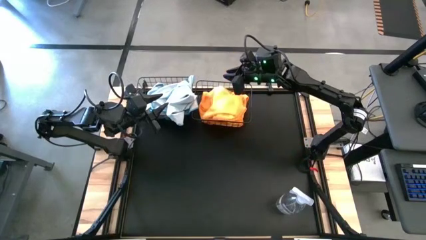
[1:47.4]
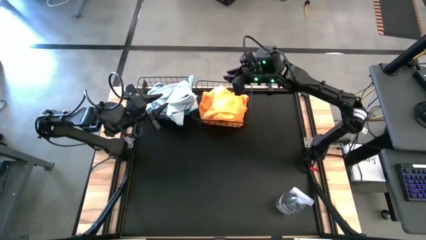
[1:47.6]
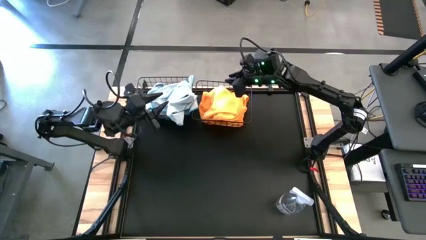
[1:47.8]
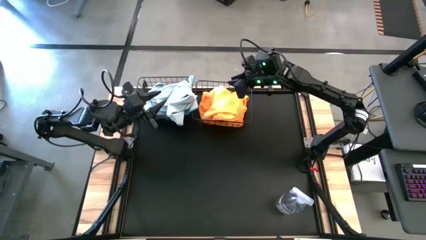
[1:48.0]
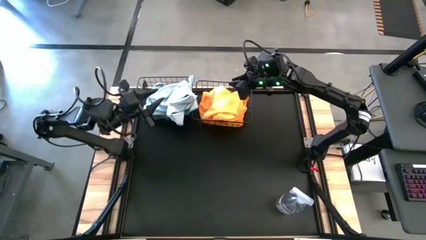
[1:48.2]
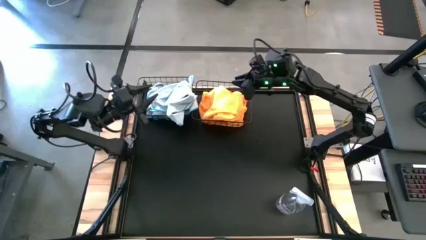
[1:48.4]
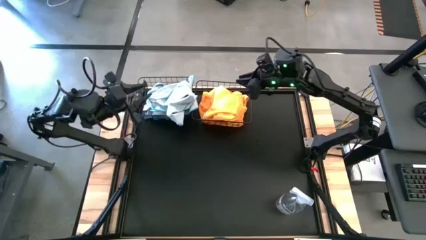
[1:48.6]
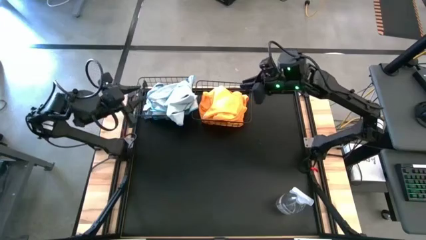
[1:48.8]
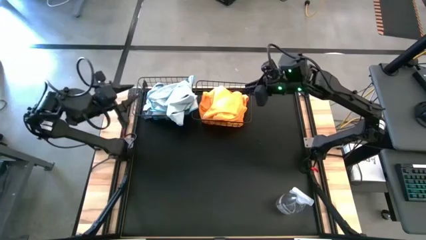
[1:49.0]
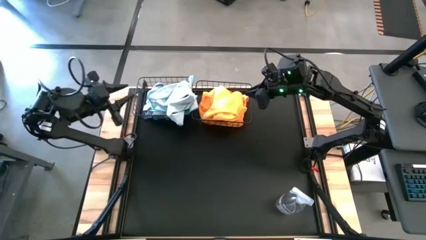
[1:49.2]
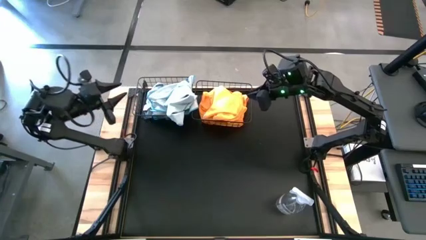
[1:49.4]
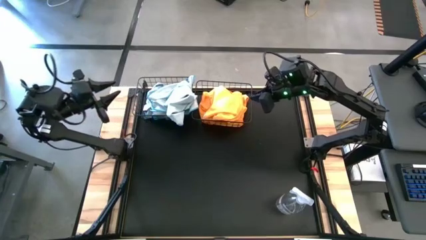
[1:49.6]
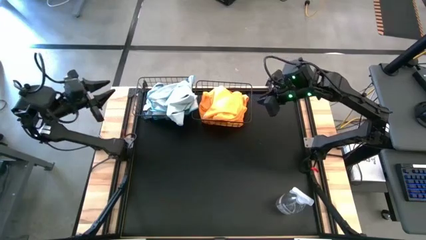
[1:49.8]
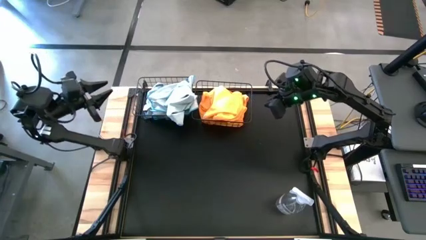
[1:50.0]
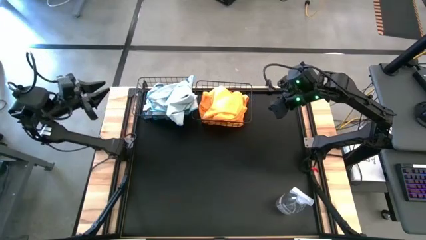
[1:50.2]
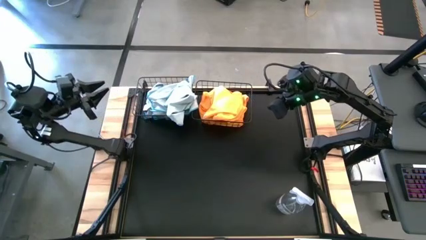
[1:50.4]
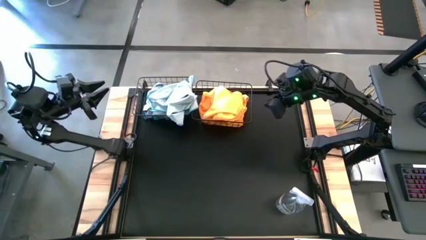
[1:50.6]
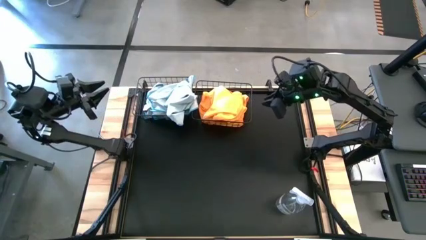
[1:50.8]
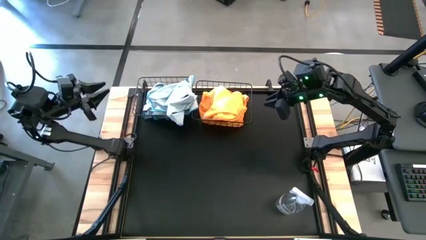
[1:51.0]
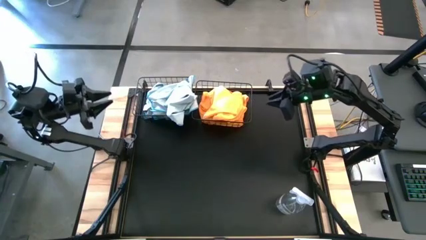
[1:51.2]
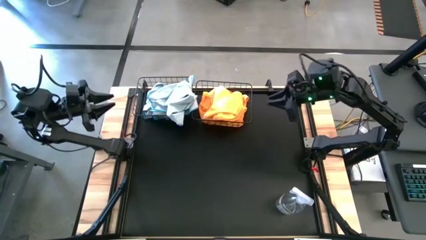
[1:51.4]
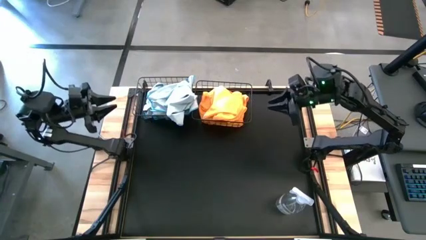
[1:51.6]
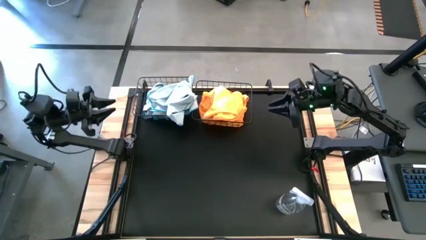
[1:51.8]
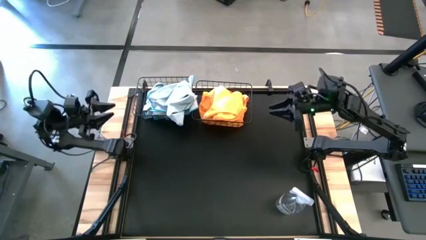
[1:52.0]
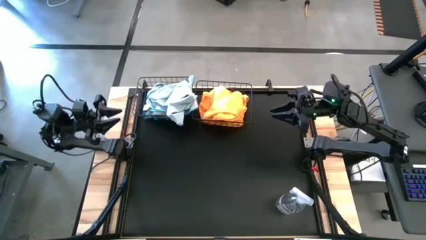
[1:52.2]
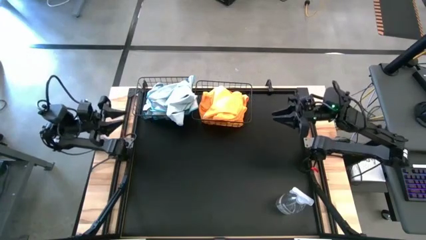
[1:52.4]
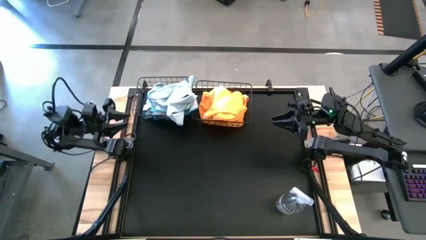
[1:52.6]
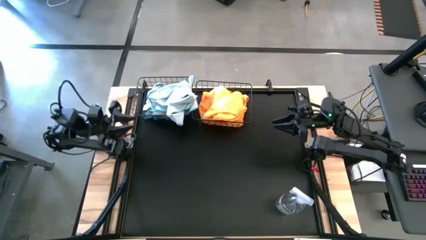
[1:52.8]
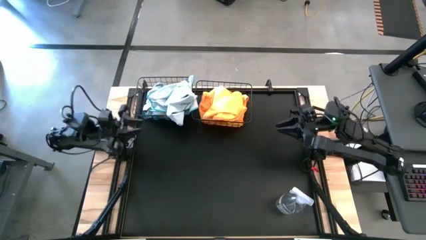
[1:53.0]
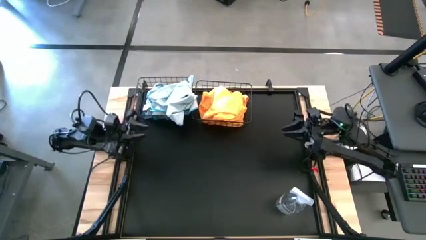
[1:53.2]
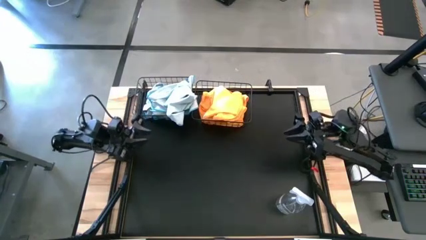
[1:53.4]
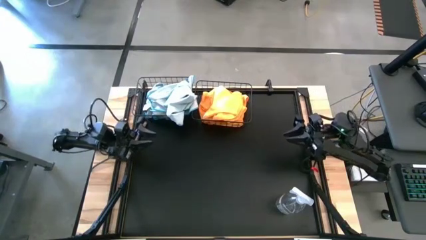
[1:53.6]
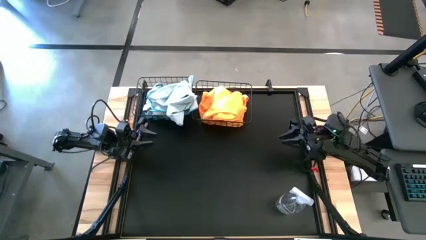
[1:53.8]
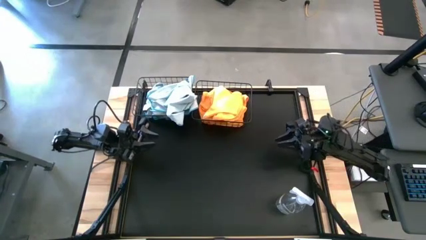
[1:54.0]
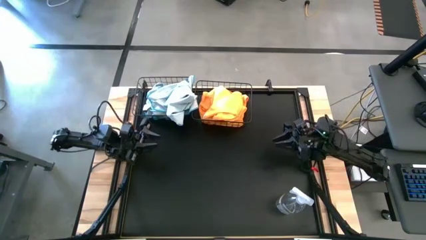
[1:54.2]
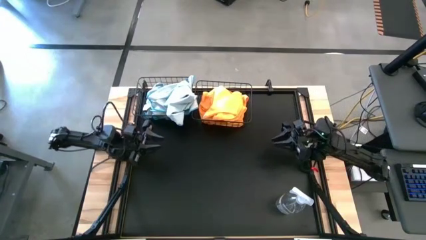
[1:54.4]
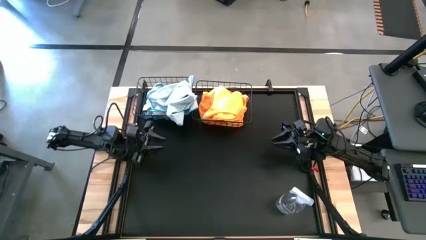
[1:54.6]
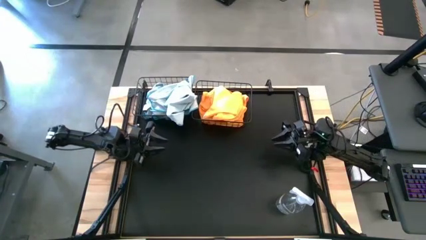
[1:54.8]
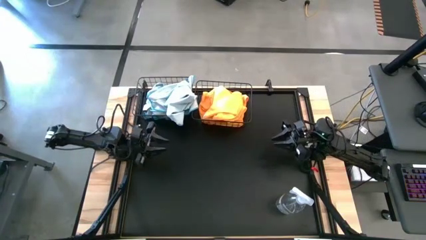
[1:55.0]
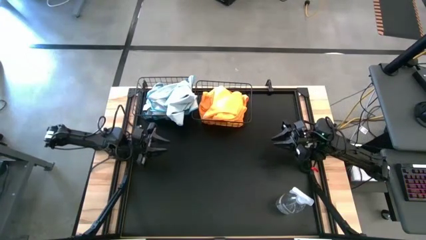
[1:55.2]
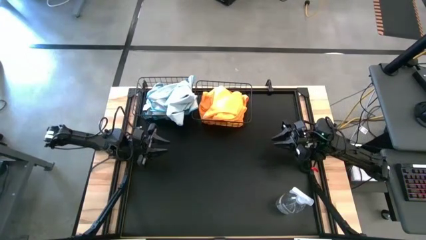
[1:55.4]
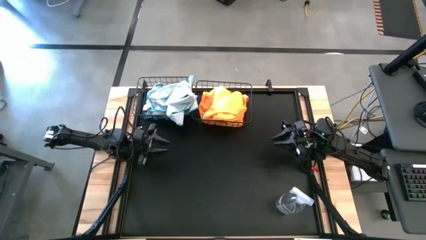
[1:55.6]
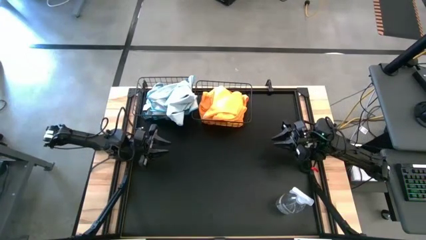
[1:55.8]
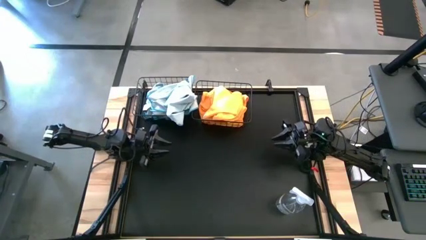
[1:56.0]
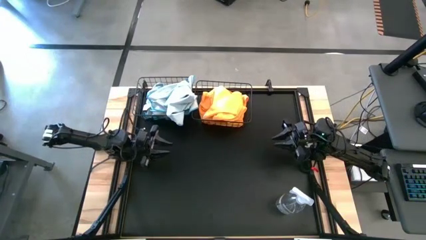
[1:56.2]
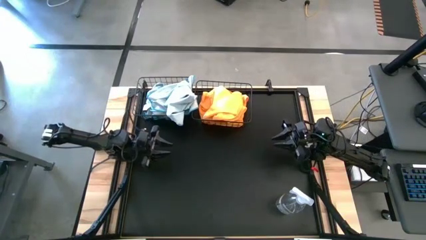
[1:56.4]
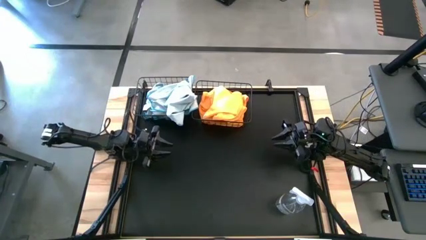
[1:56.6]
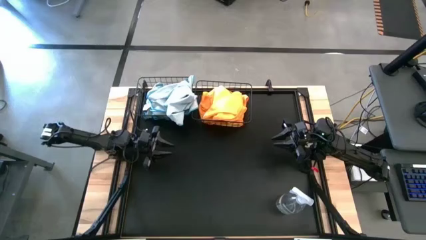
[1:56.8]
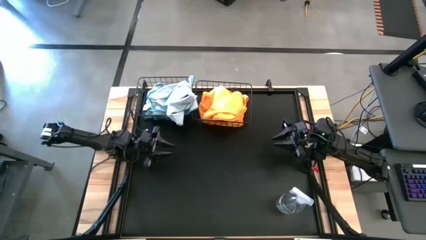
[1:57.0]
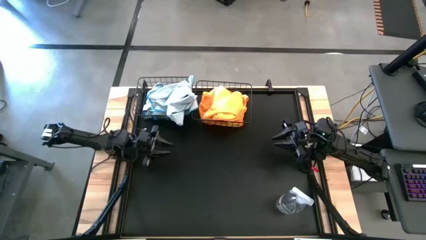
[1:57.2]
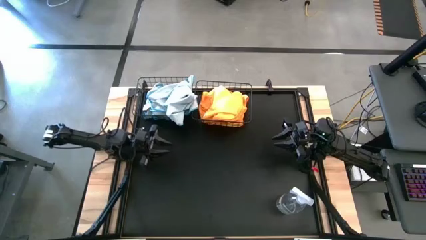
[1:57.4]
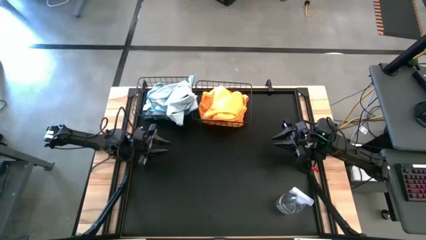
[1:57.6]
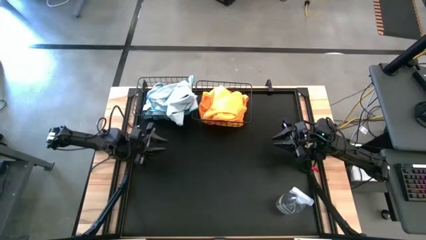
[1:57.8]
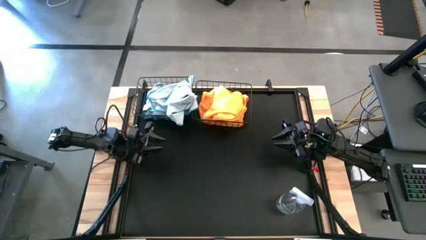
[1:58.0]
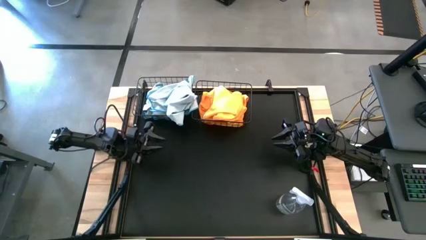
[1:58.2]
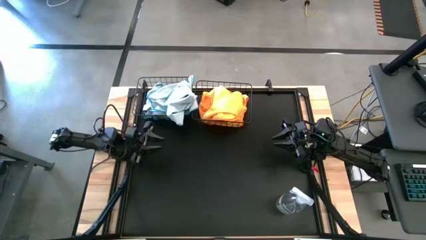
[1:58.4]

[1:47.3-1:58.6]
Task: Sort microfiber towel by color & place in baskets
Return to Home Position

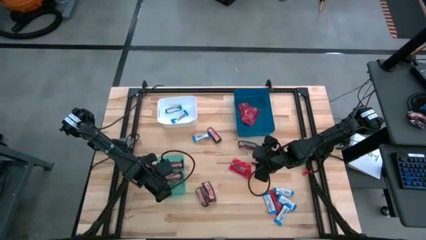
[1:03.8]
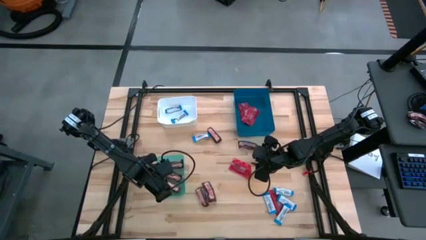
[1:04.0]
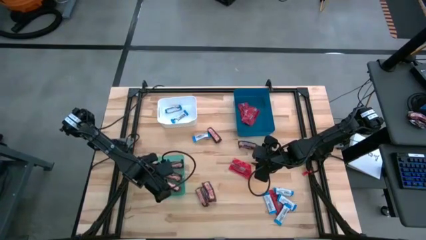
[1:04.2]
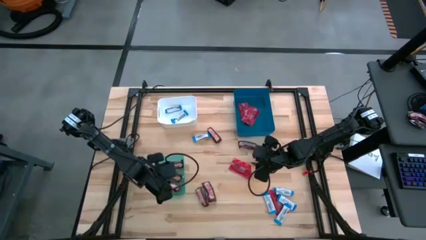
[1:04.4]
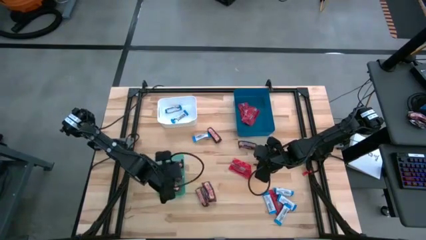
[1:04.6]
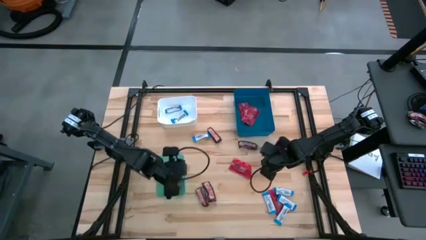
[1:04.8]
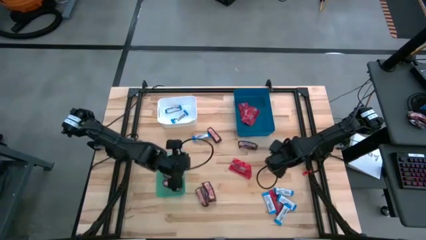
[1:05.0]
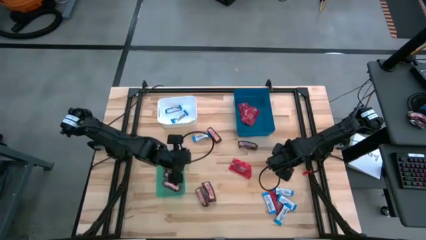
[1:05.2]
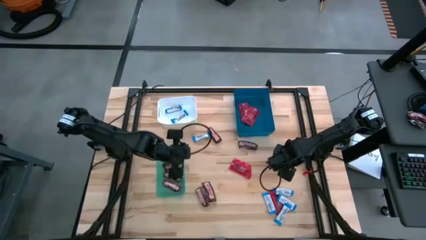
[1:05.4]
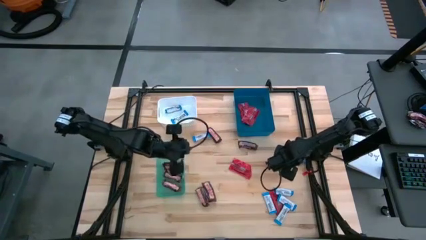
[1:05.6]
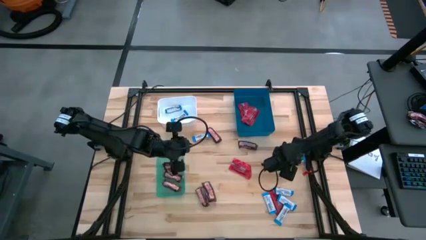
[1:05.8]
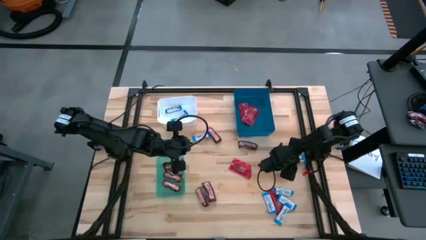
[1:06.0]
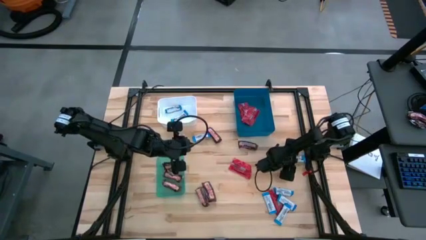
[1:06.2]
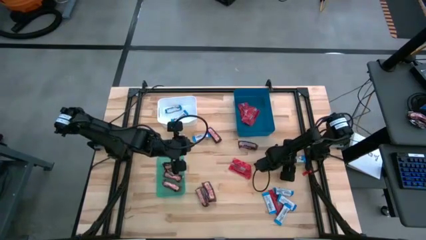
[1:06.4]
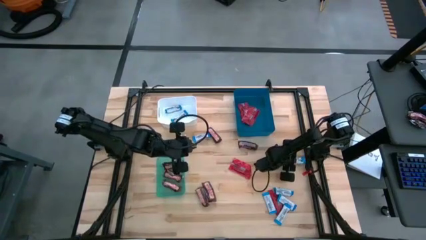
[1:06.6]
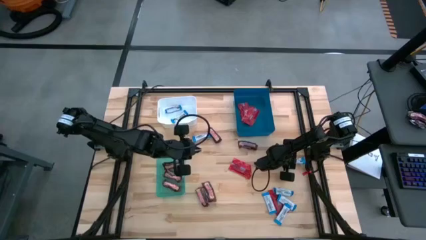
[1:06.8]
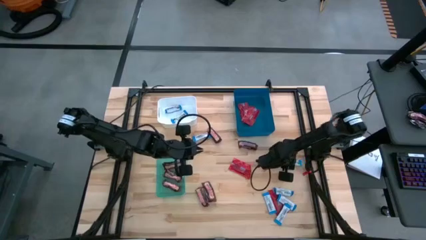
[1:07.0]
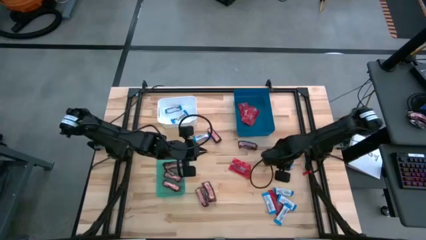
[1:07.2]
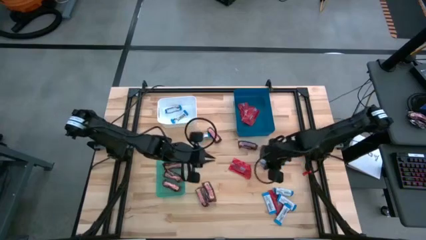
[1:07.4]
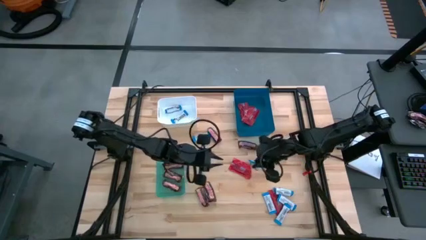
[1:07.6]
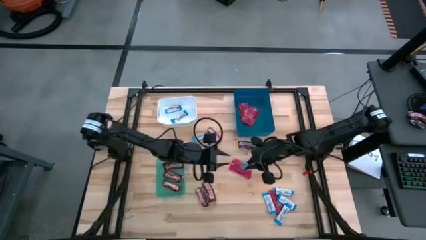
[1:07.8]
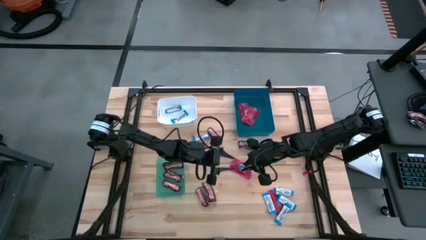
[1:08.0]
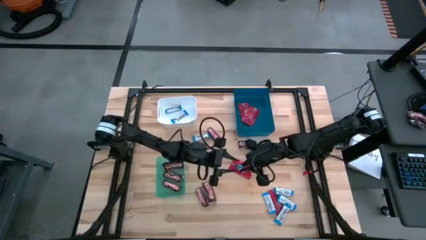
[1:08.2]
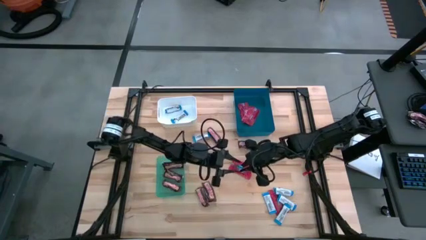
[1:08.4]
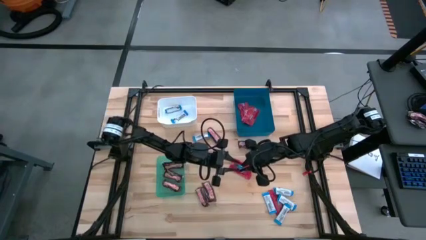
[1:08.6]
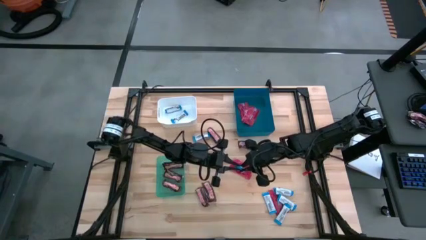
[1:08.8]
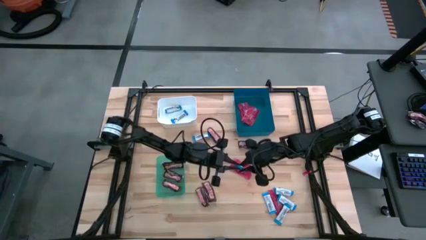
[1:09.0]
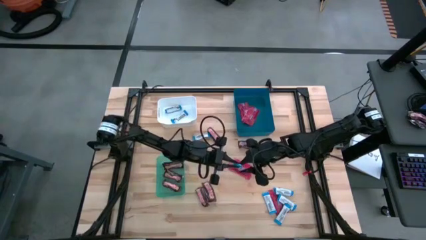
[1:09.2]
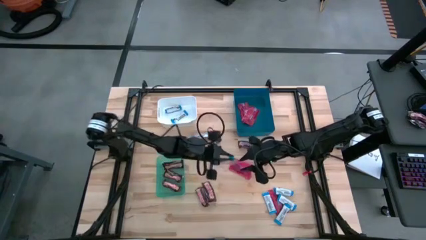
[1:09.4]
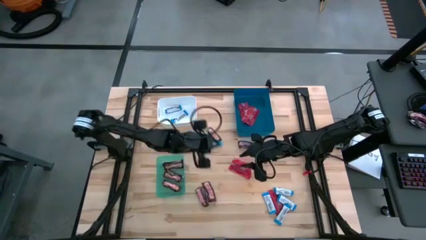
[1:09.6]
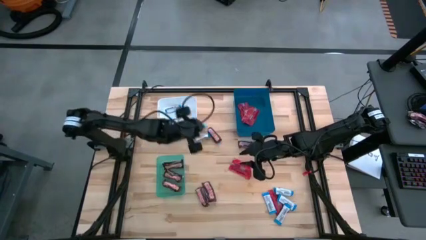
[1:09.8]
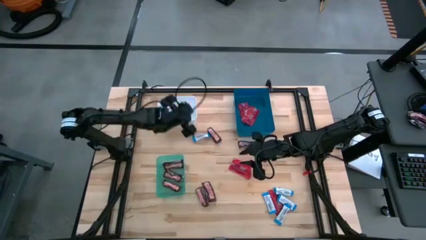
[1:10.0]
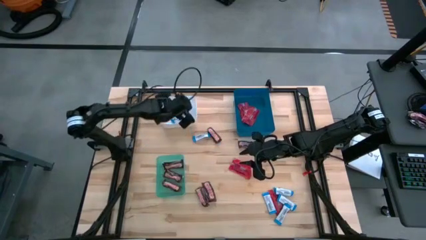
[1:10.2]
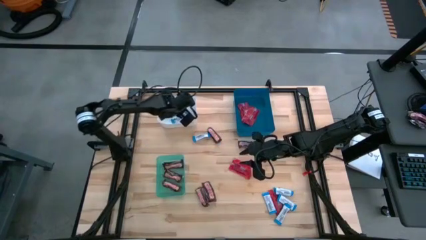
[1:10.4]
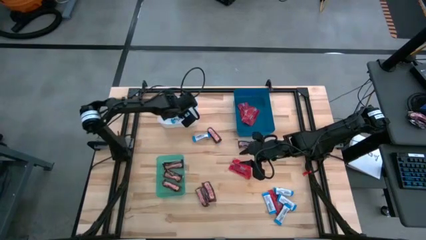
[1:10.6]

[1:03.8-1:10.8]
Task: Sort candy
Put the white chocolate bar into the white bin
